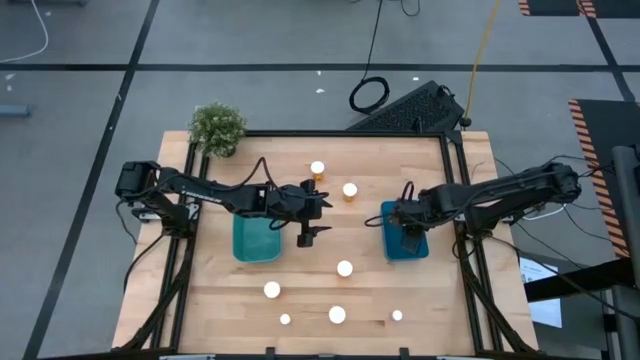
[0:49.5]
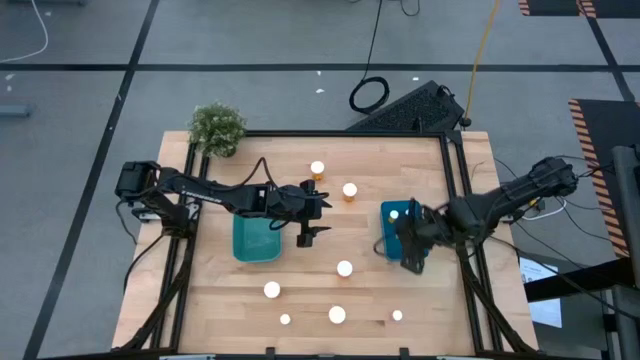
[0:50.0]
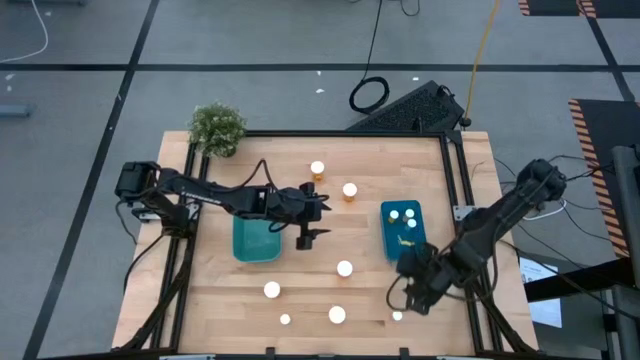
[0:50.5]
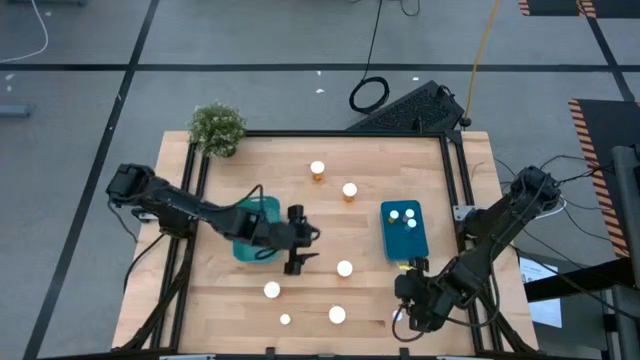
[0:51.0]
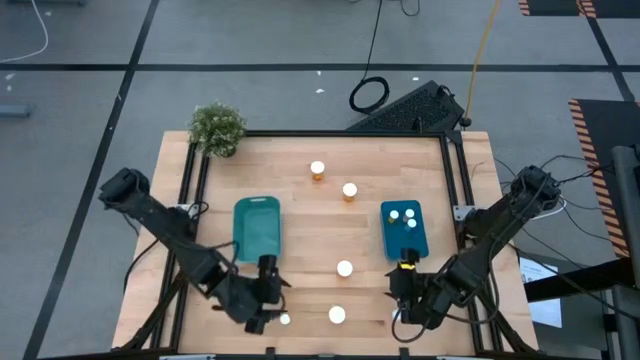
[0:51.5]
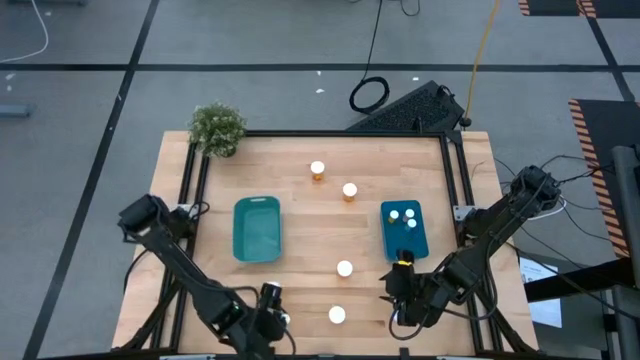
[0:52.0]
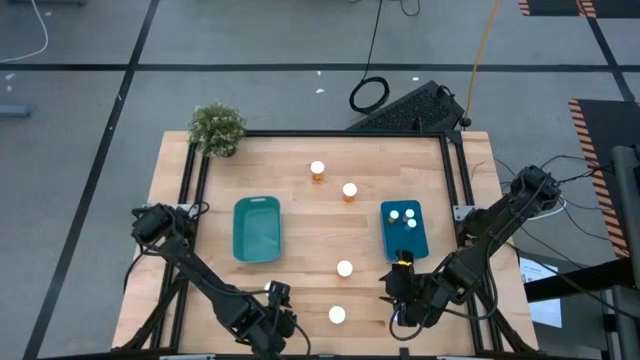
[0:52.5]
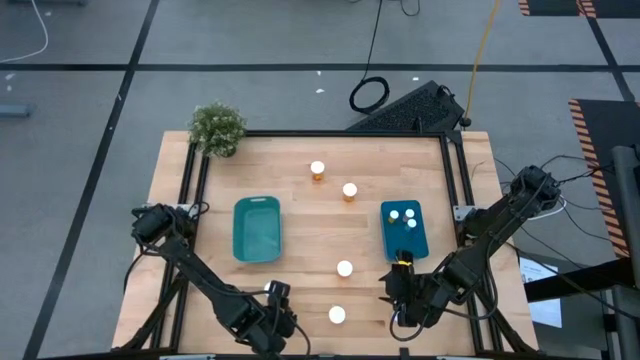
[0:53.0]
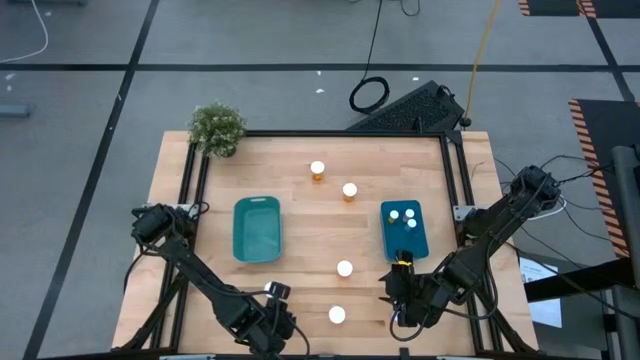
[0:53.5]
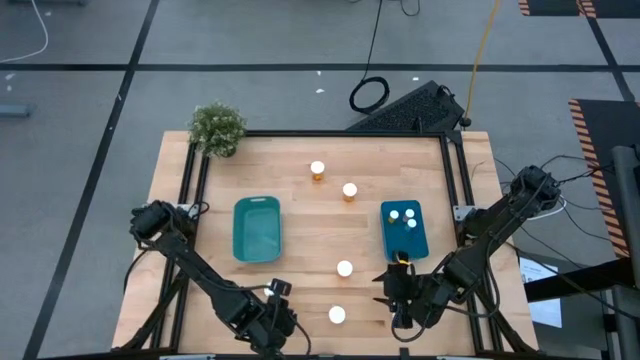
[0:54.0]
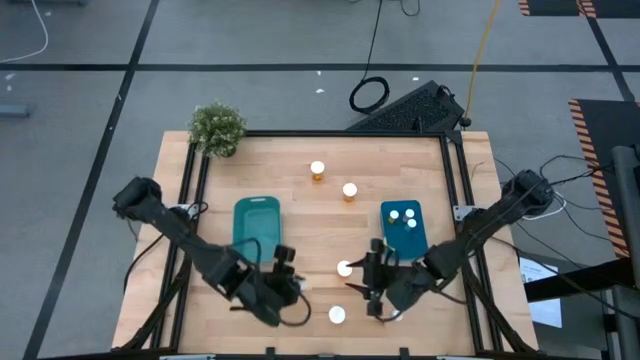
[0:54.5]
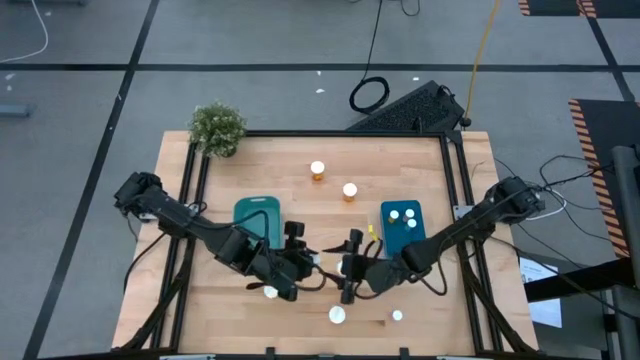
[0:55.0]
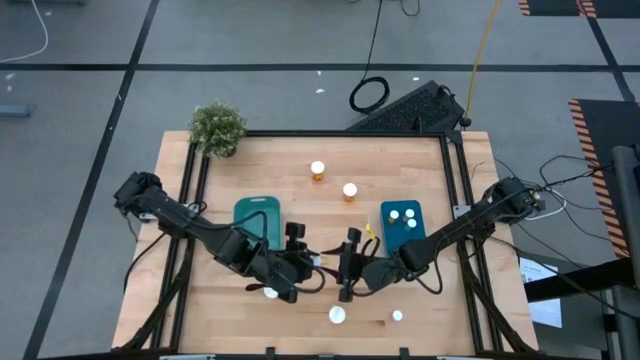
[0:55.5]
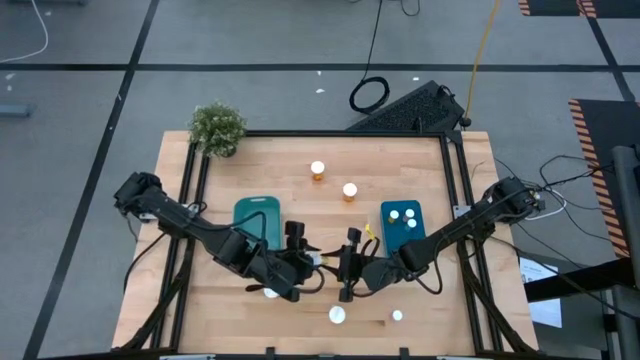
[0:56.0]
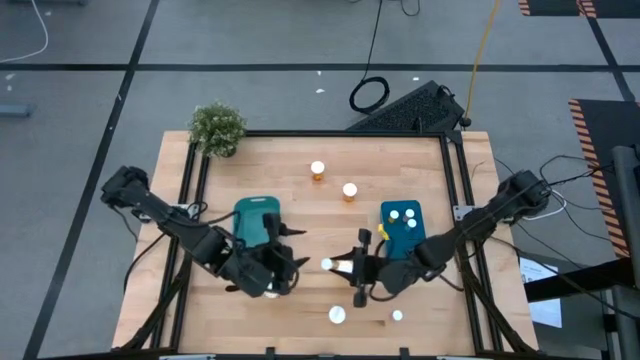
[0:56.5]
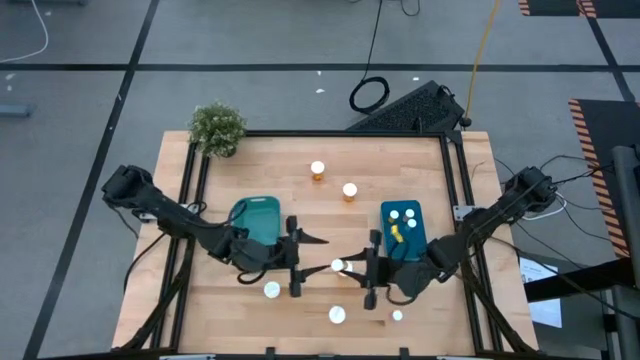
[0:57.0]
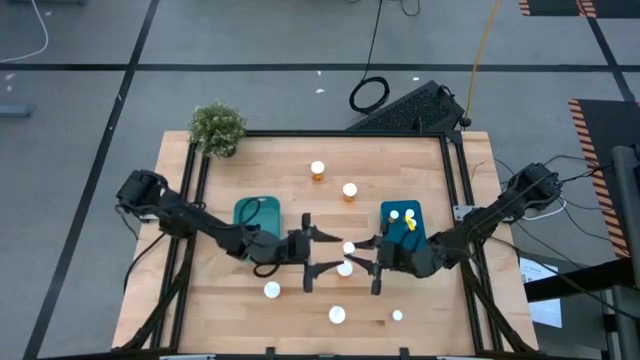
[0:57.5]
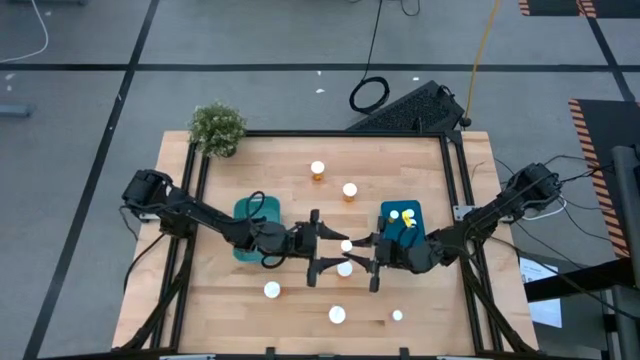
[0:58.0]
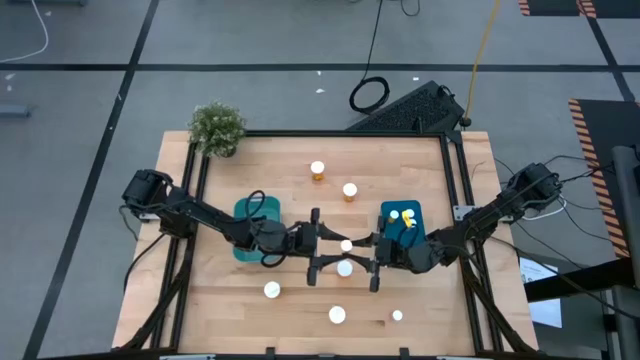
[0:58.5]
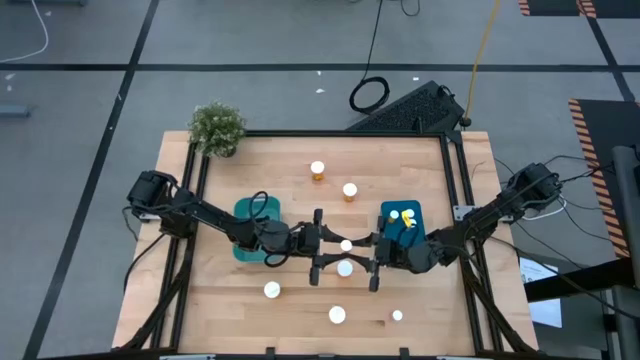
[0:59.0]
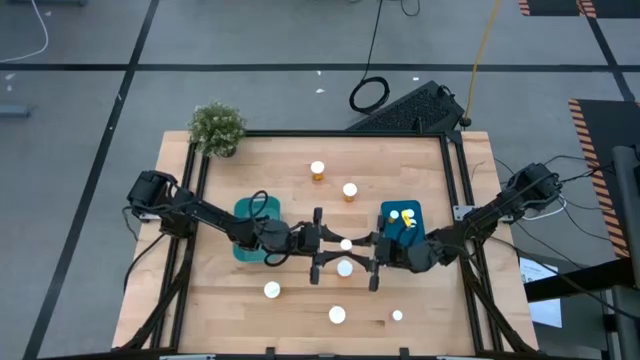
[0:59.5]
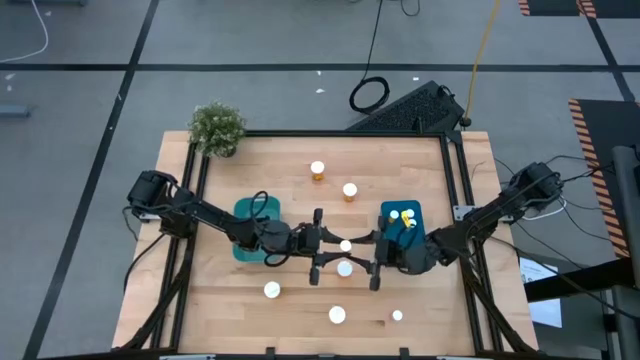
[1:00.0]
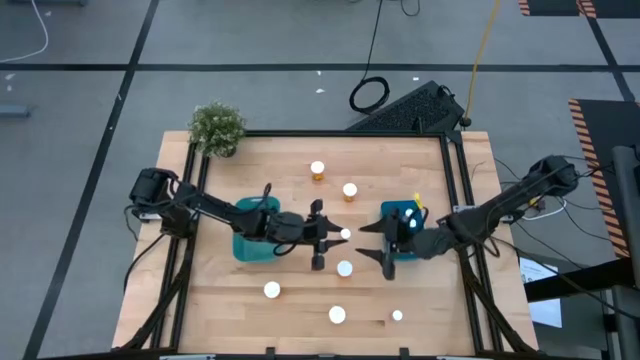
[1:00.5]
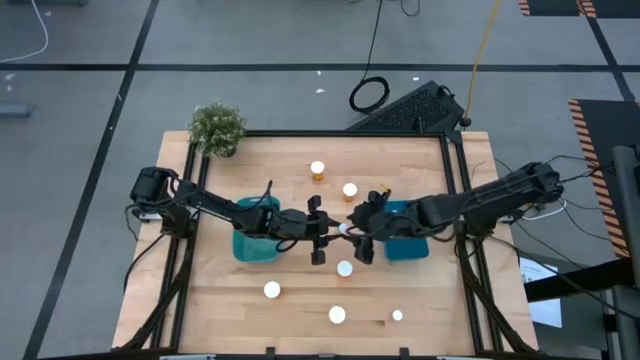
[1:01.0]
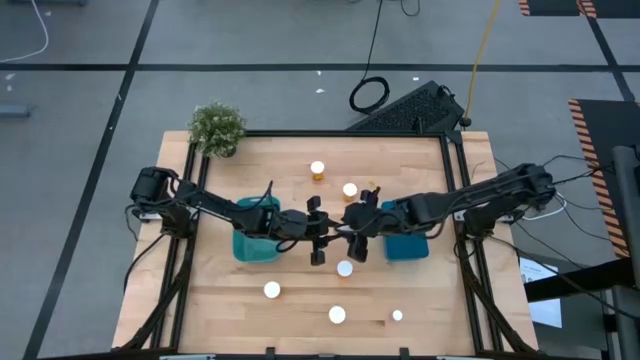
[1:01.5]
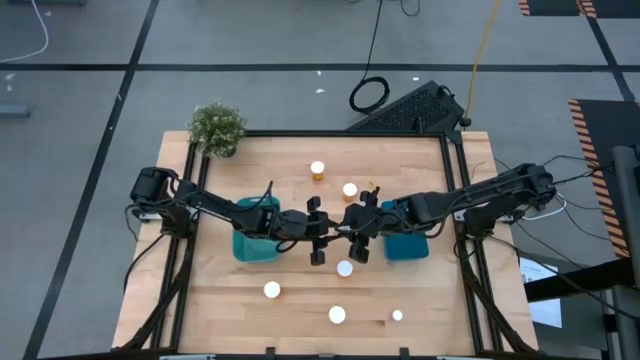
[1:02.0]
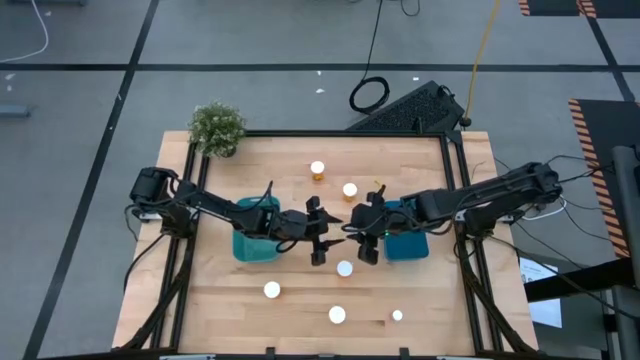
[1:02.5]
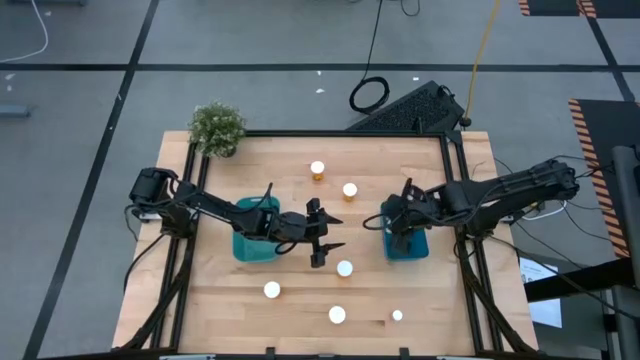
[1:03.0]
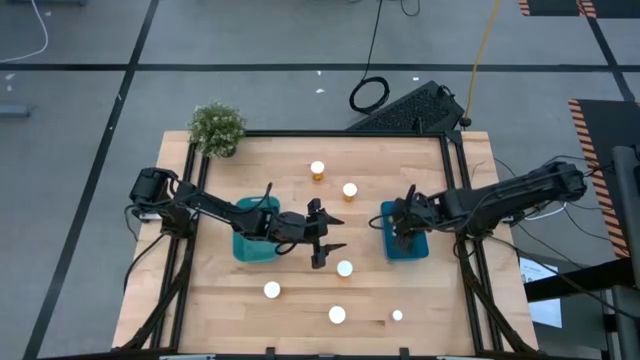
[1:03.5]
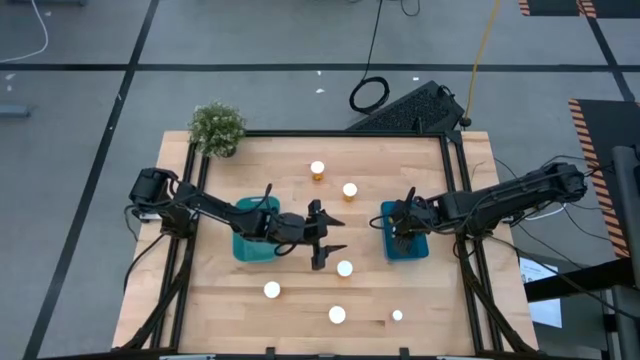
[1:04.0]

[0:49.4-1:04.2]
Task: Pick and place medicine bottles into bin by pill shape (circle, oval)
Put the yellow tablet bottle into the blue bin

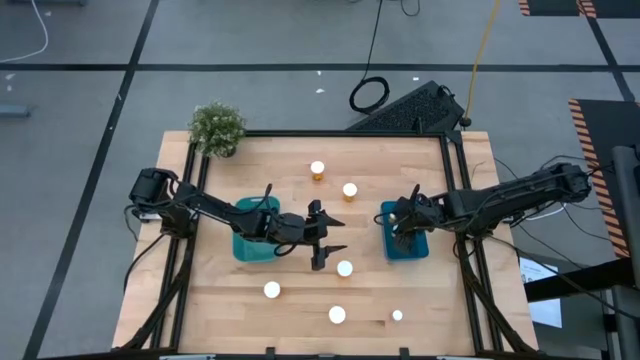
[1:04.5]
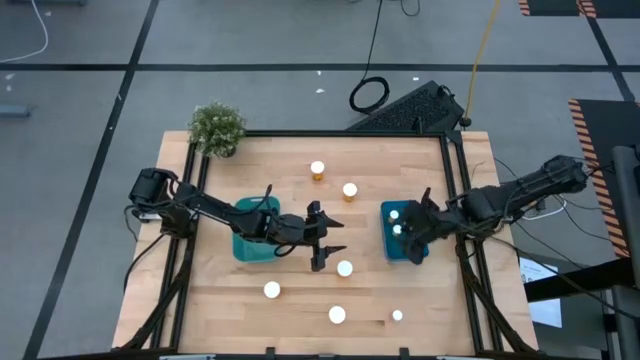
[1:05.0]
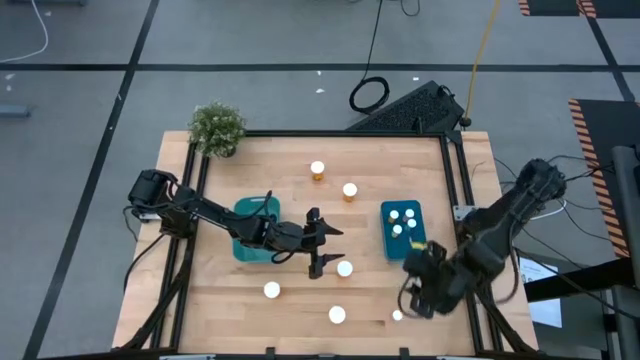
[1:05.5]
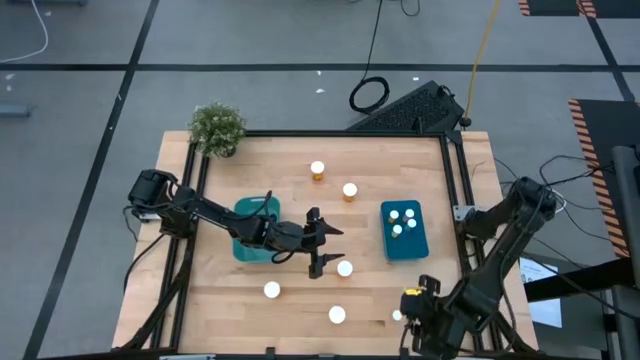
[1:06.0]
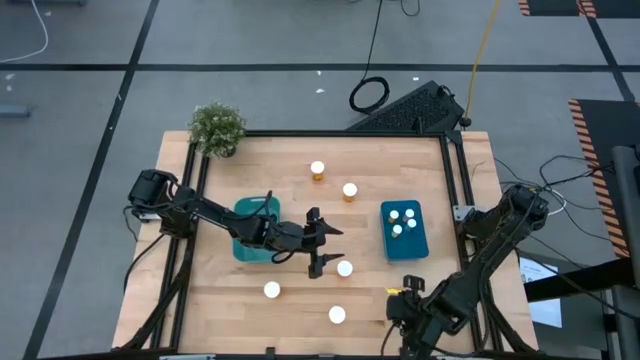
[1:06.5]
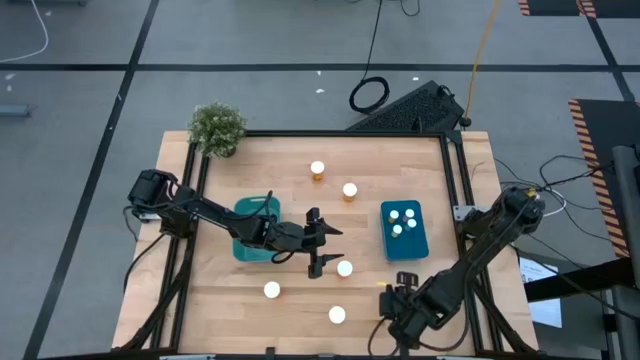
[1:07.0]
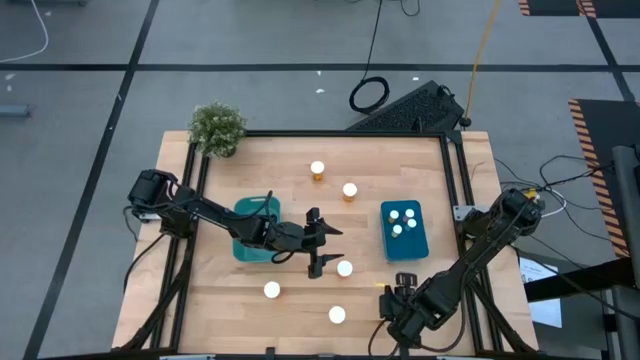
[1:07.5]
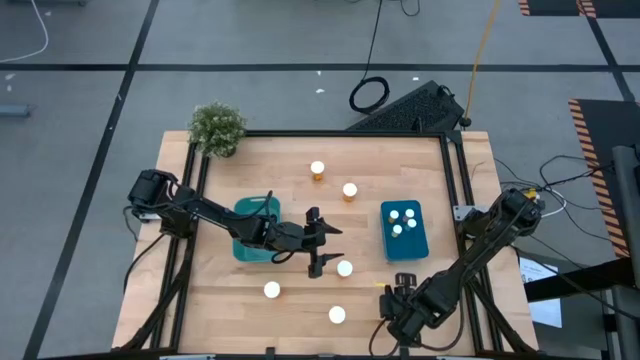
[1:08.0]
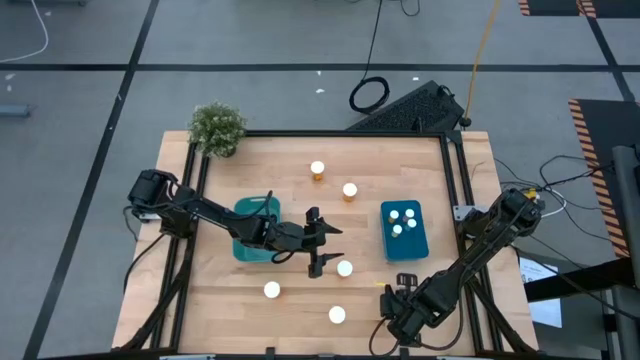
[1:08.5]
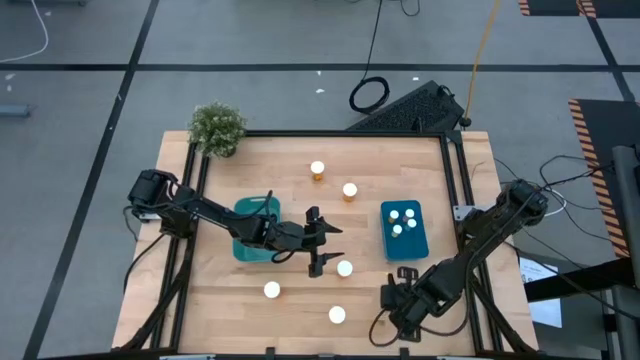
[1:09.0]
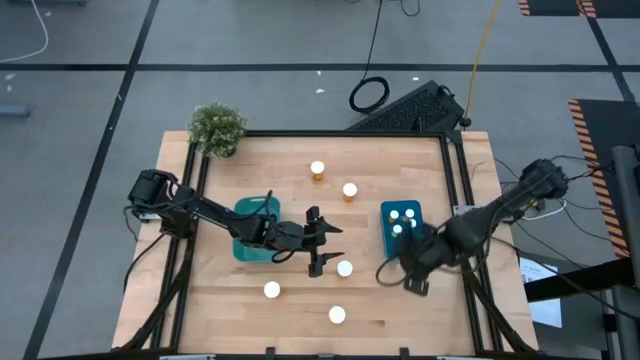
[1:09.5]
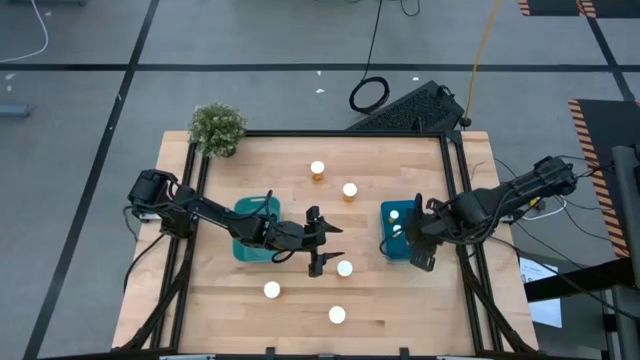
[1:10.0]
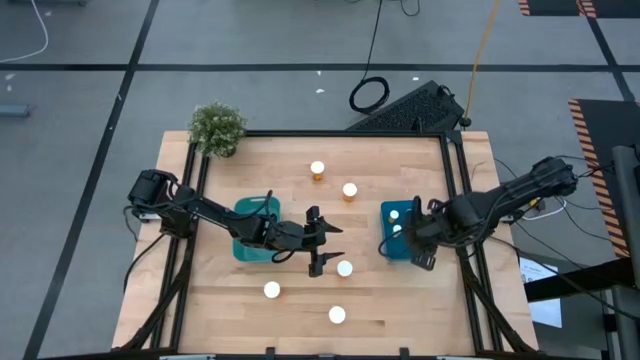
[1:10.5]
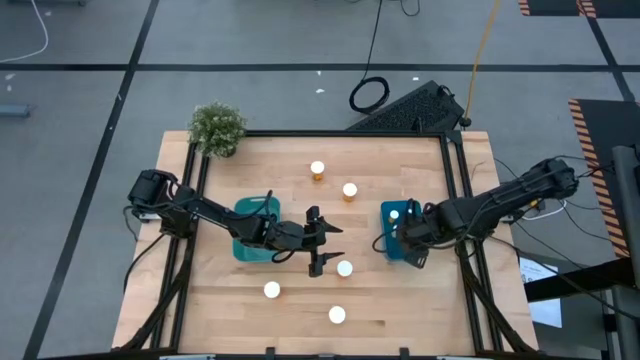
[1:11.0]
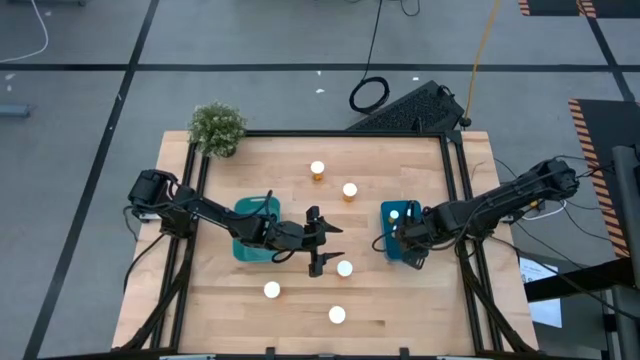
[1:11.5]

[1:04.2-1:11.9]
Put the purple tablet bottle into the blue bin

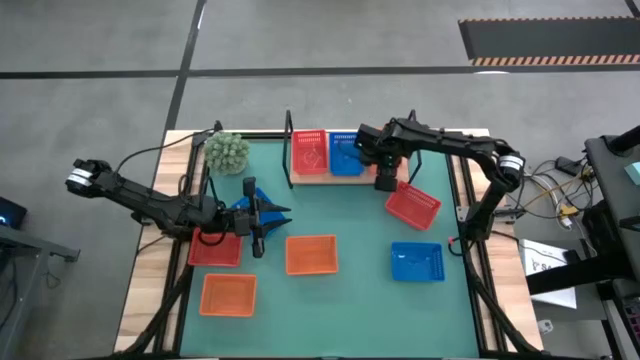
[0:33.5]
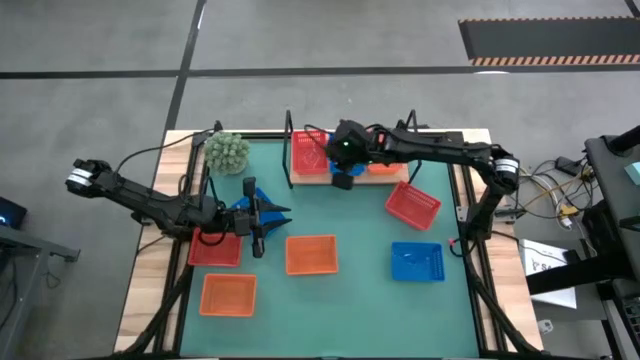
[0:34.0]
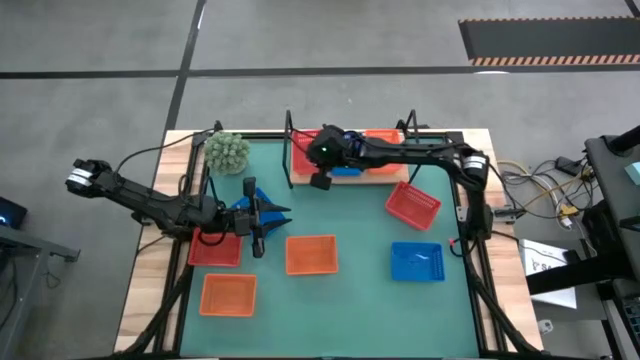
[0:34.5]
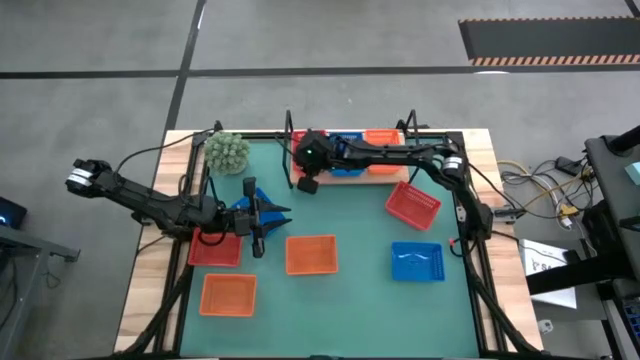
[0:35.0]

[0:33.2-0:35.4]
Task: Stack baskets on shelf by color
Adjust the red bin on the shelf
